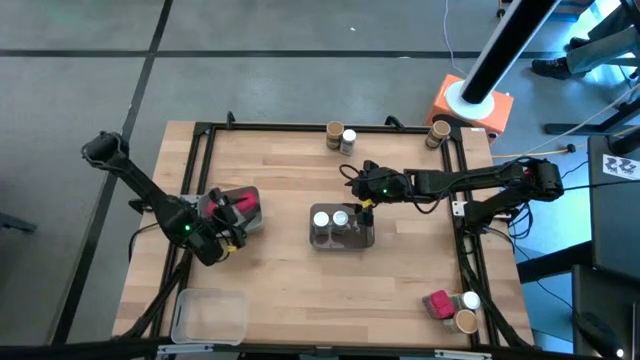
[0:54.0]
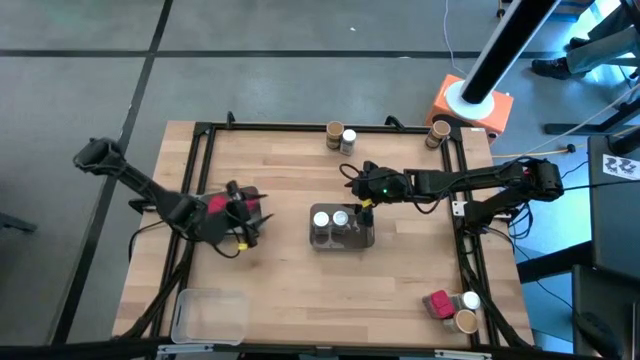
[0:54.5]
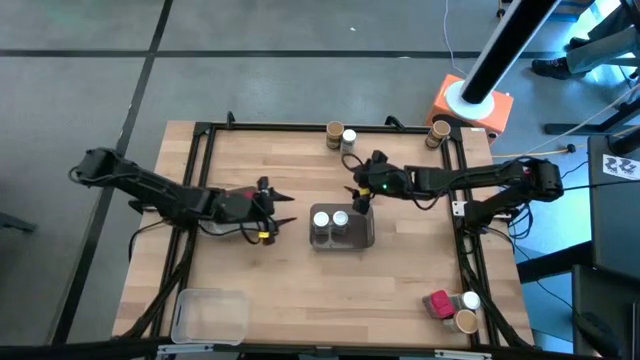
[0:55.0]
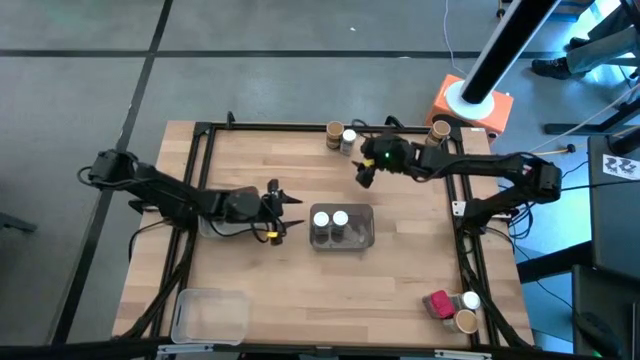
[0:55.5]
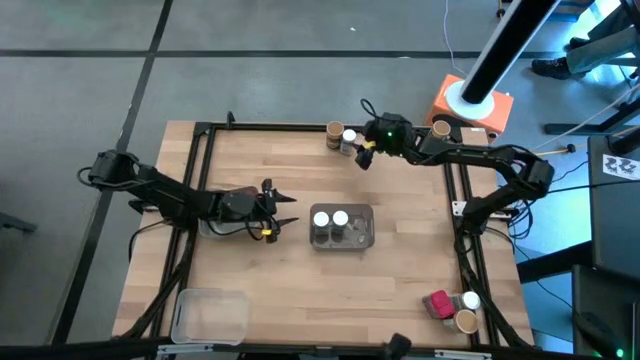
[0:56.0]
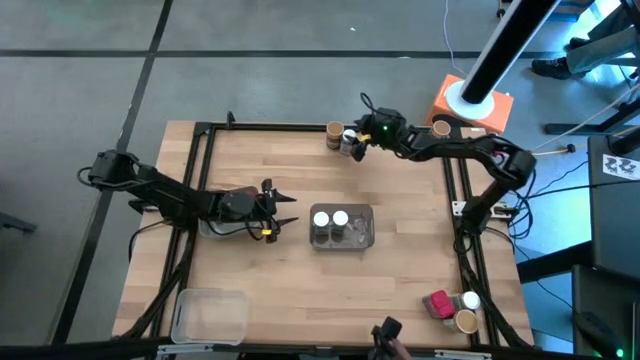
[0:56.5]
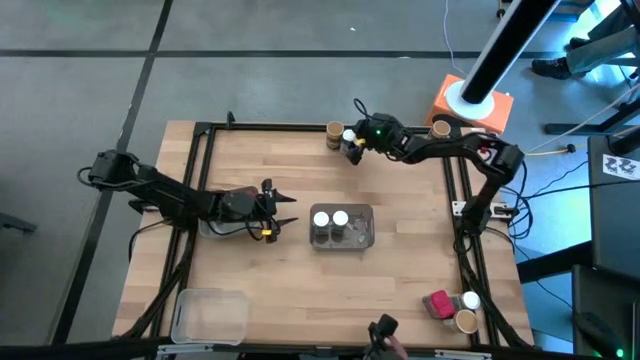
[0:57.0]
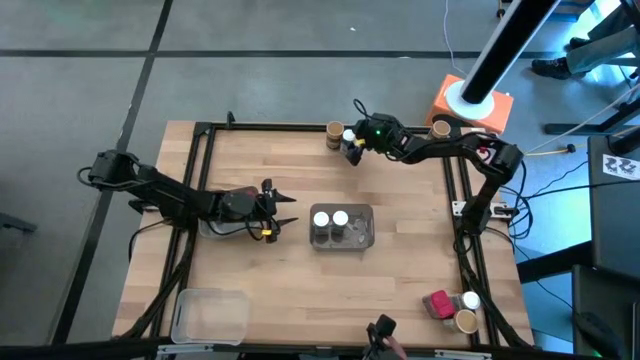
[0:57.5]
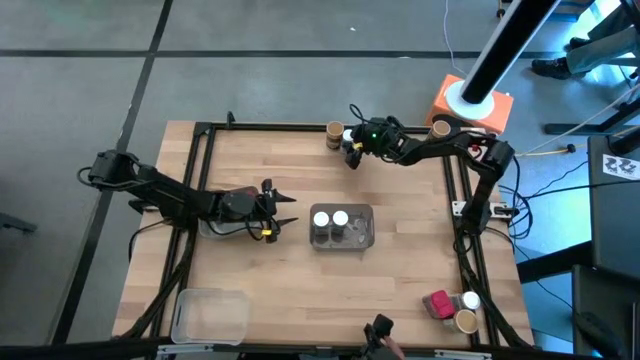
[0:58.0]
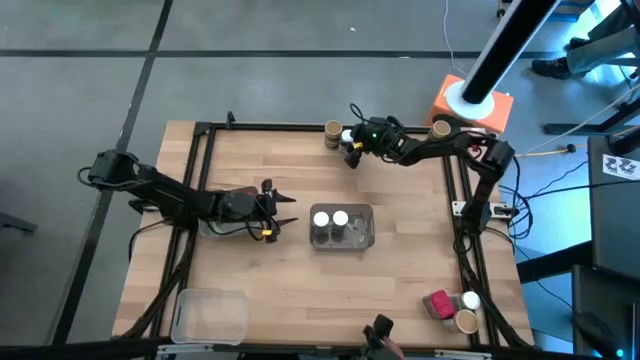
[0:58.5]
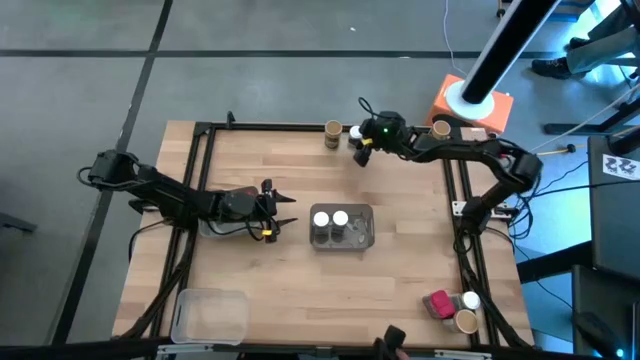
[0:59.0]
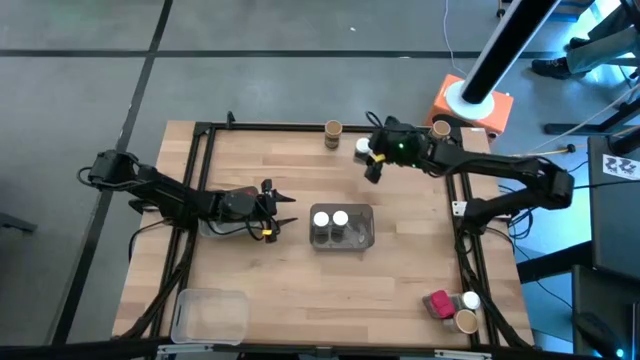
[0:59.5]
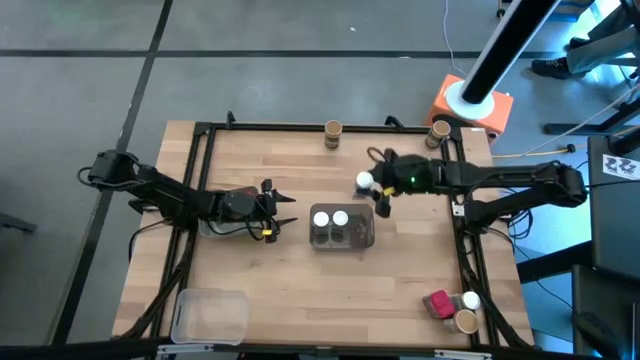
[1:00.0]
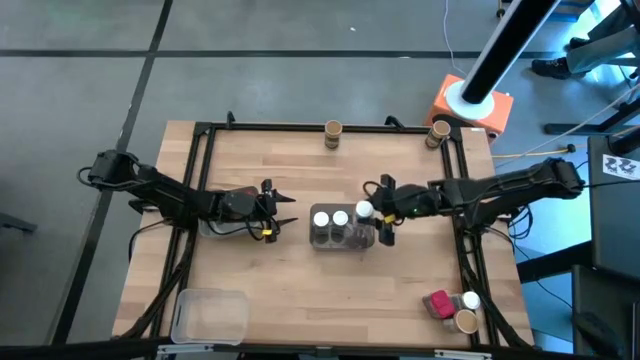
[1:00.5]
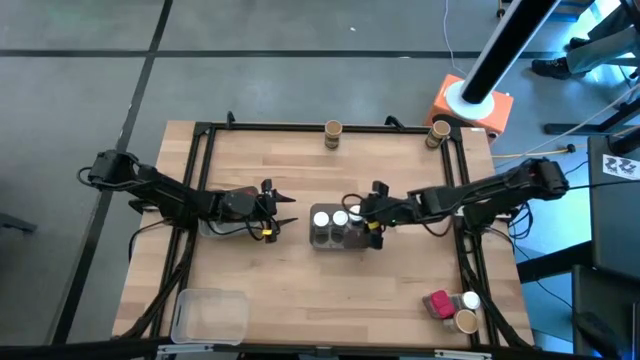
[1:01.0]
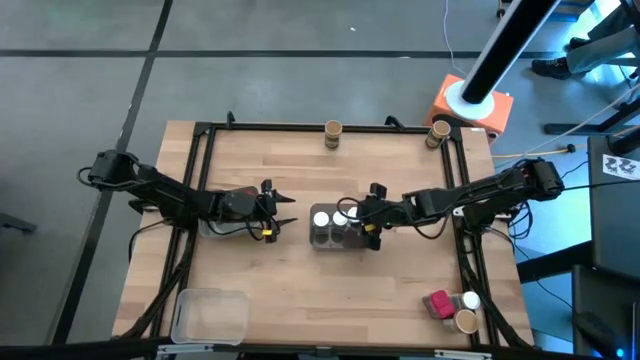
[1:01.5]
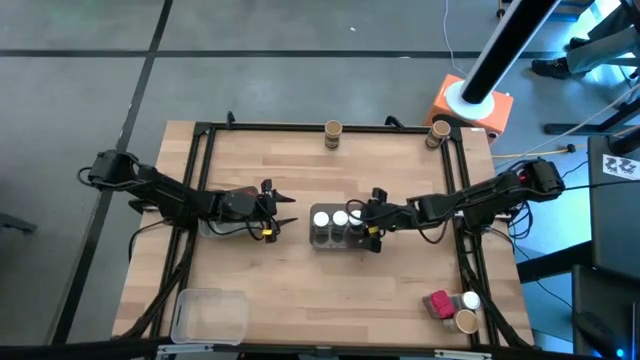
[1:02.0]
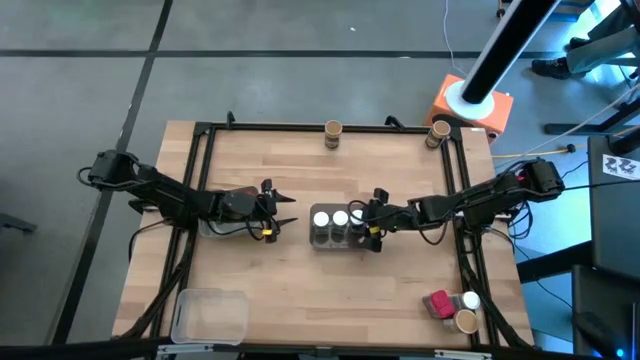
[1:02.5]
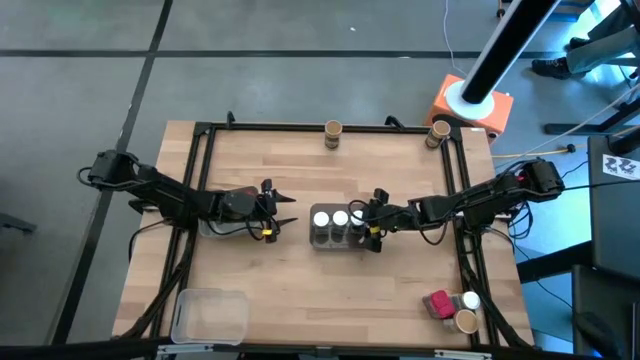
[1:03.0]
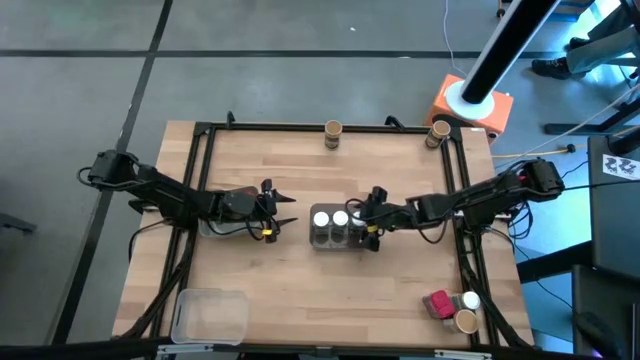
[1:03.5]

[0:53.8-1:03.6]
Task: Sort spices by type
Put the top white seasoning bottle into the black bin

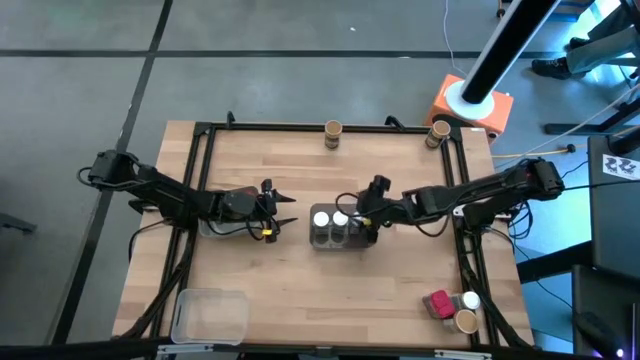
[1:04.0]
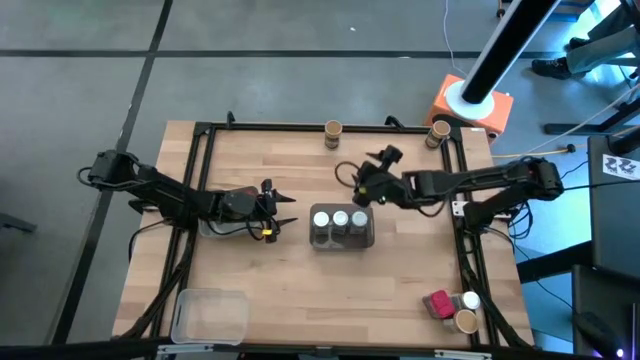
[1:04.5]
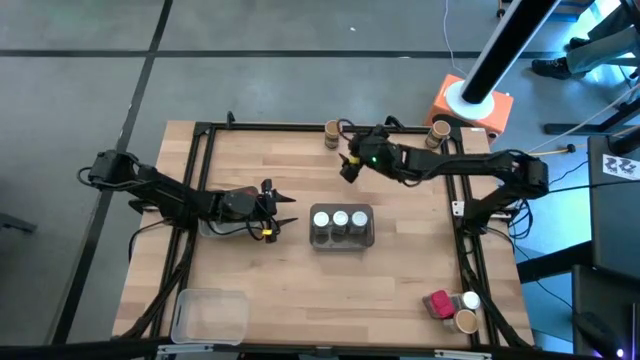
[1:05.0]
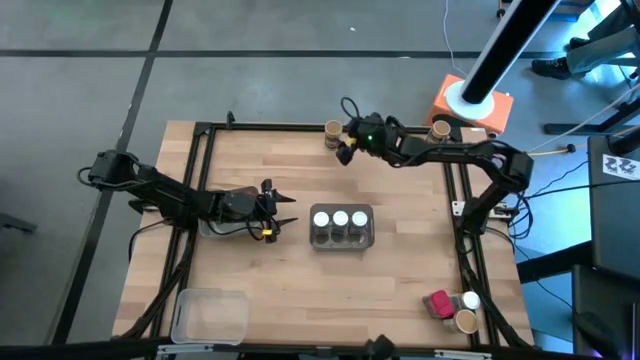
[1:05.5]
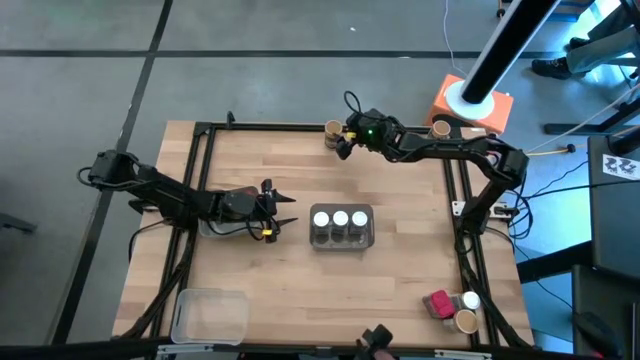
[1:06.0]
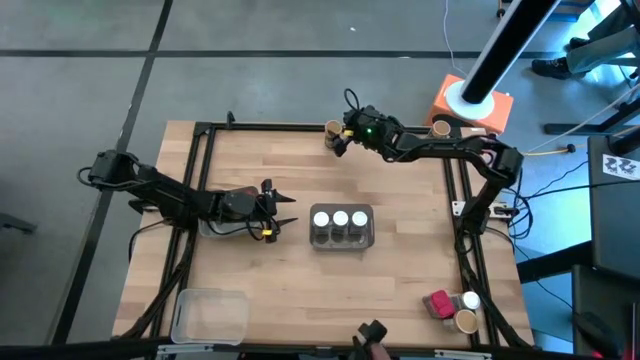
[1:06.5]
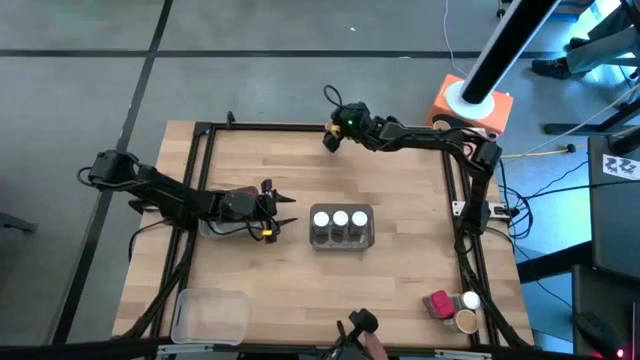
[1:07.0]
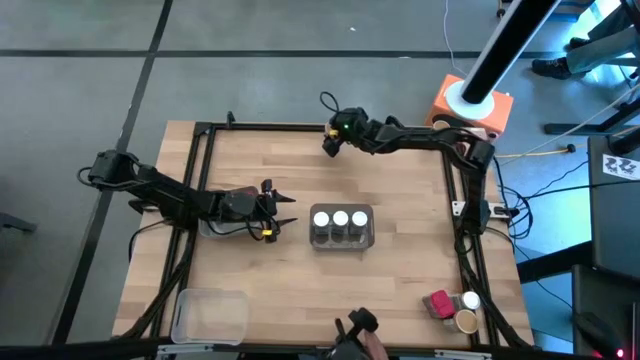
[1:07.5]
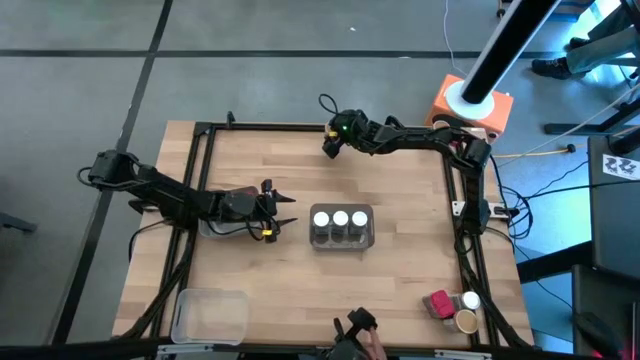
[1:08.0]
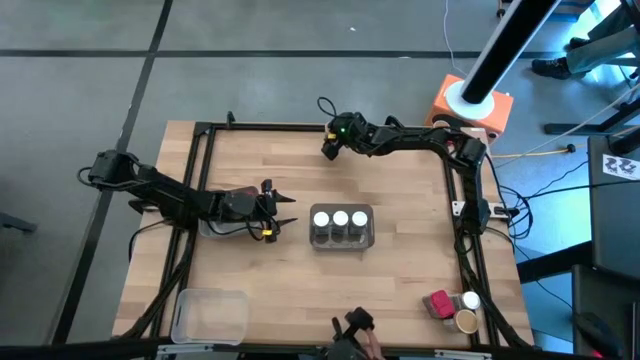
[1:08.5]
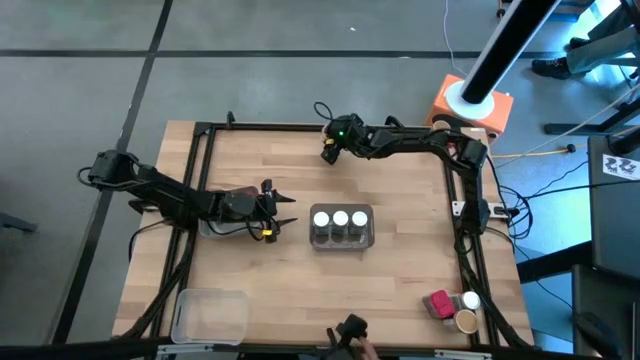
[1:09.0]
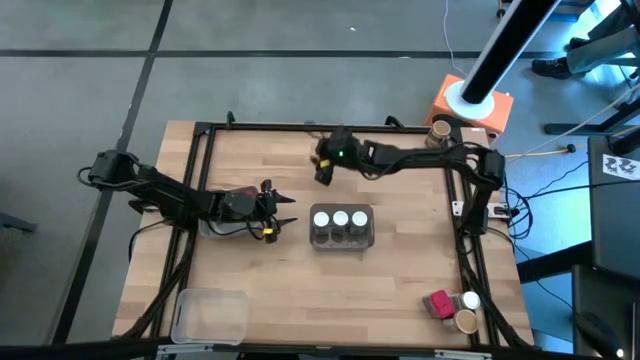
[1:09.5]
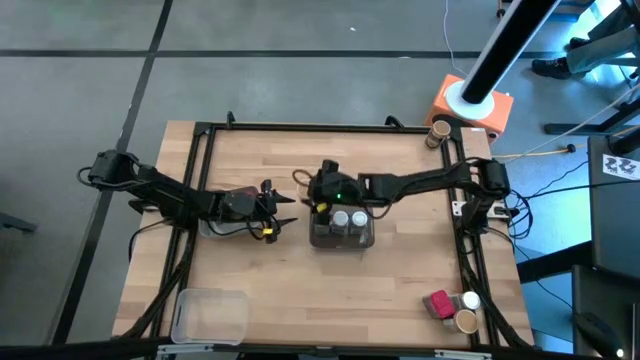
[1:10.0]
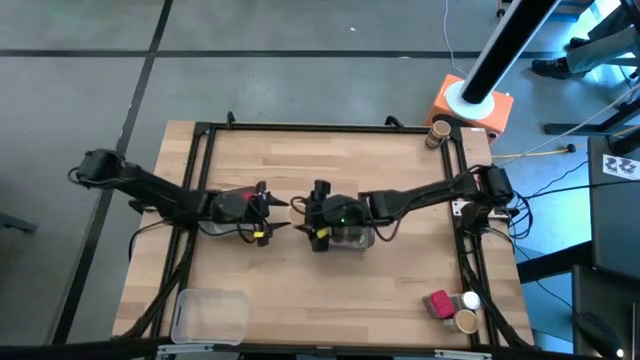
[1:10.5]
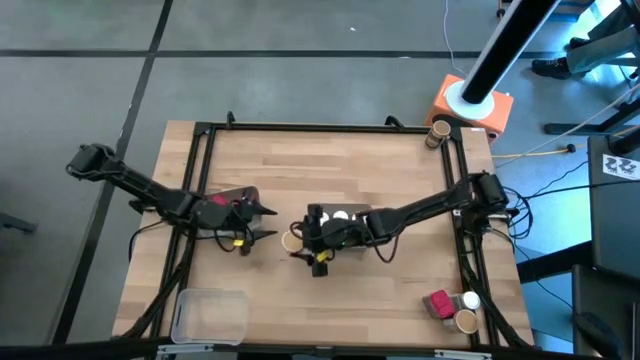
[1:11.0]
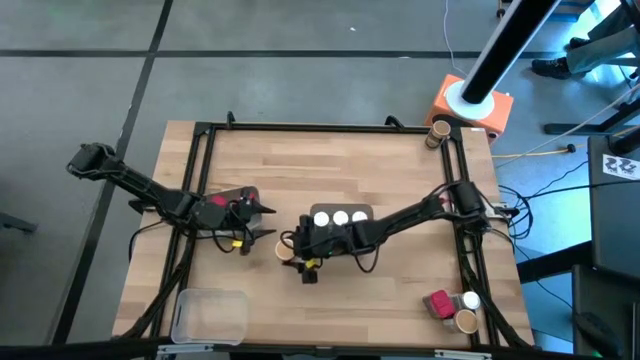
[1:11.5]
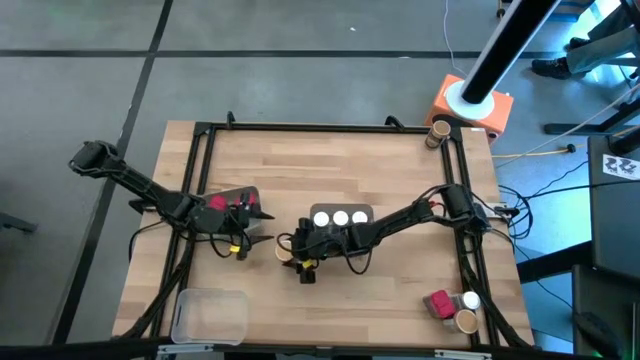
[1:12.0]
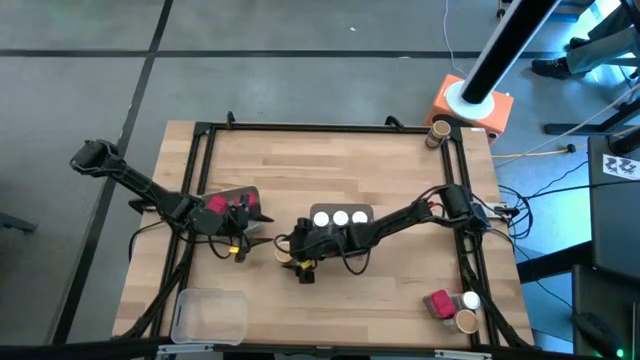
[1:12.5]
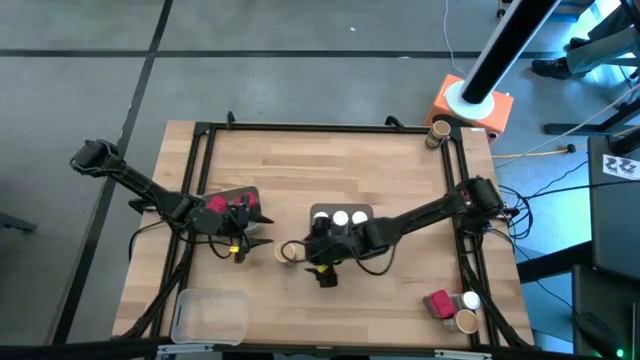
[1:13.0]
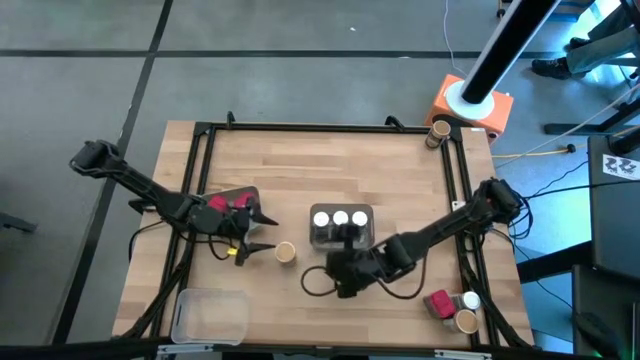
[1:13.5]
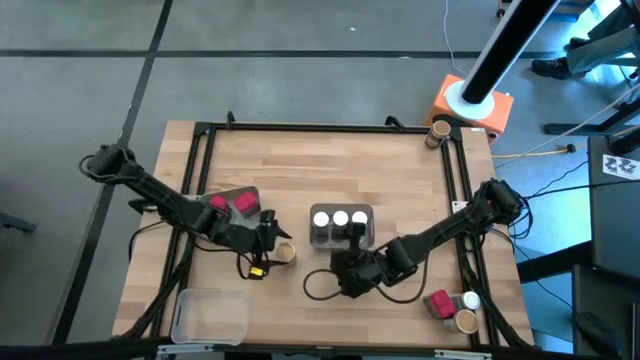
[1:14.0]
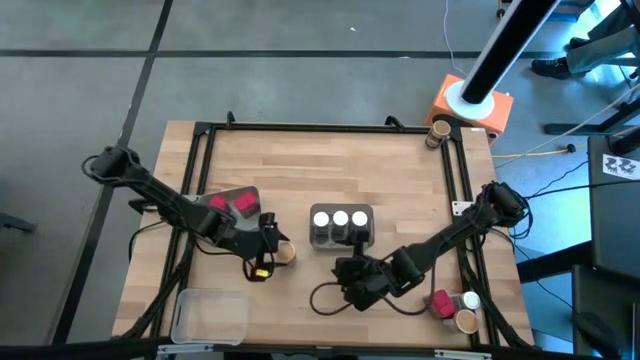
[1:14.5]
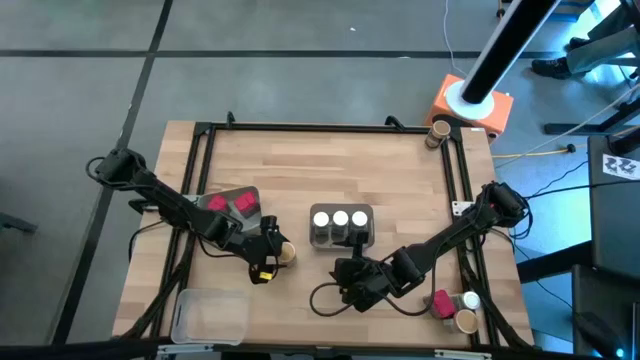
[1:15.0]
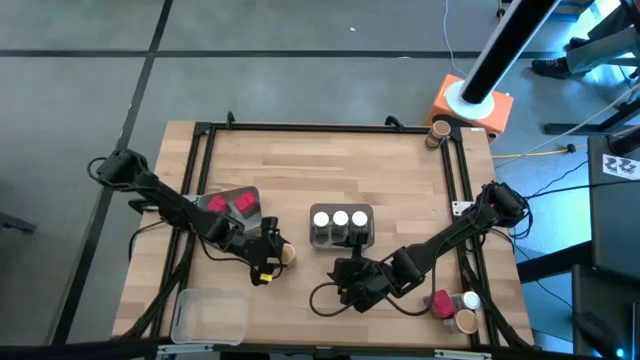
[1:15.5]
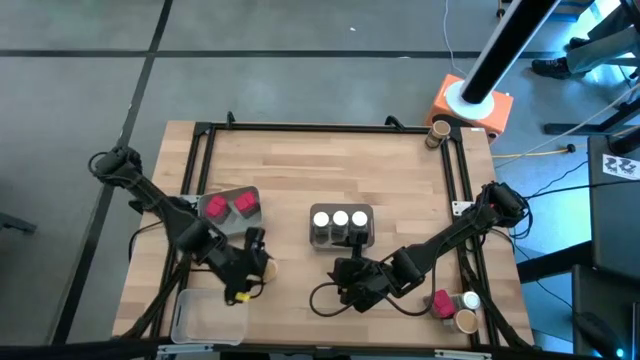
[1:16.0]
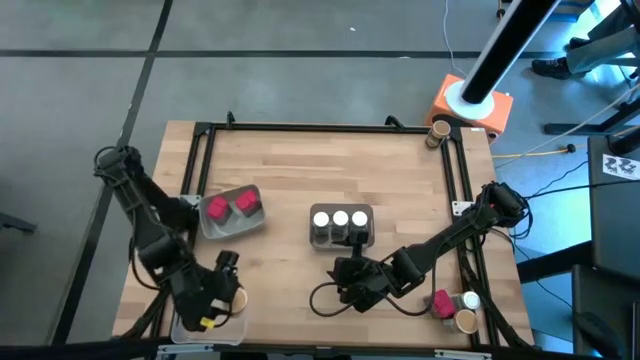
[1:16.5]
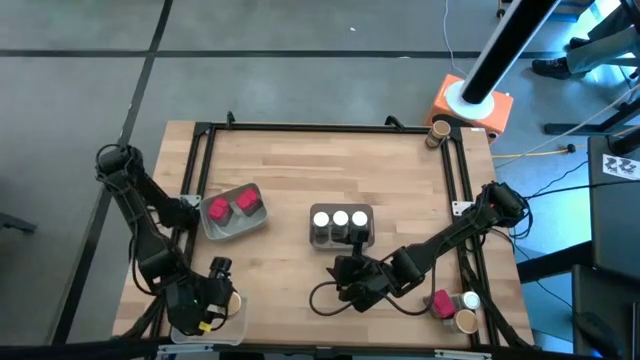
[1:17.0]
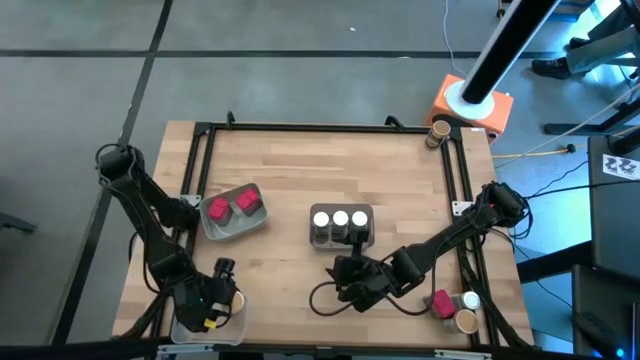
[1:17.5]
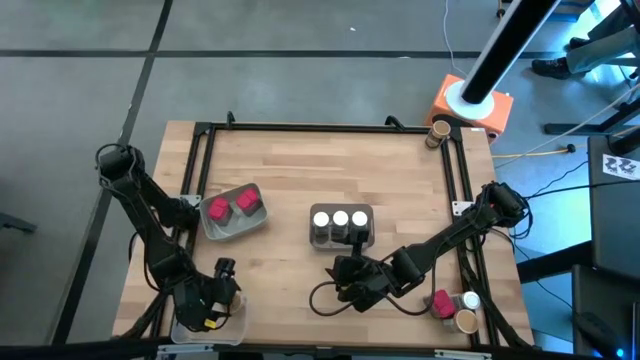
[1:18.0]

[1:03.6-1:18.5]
Put the left gold seasoning bottle into the transparent bin
